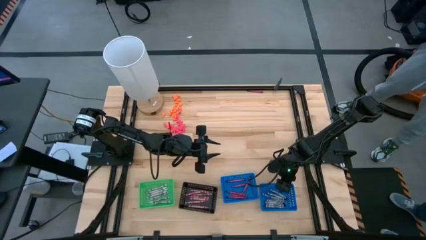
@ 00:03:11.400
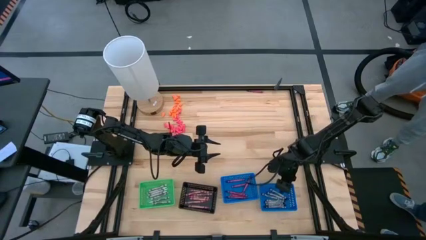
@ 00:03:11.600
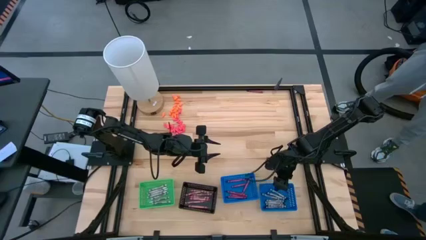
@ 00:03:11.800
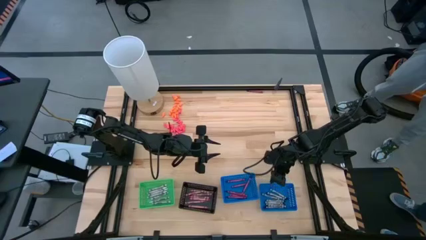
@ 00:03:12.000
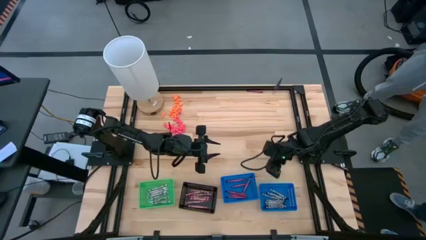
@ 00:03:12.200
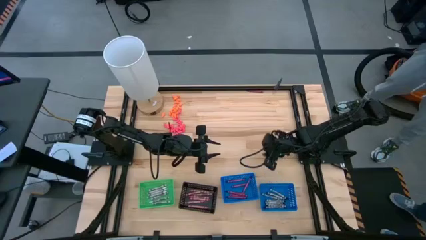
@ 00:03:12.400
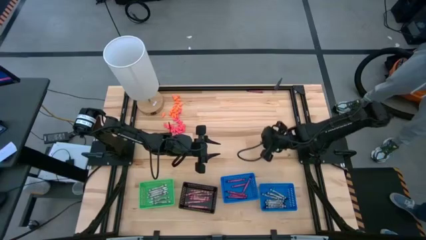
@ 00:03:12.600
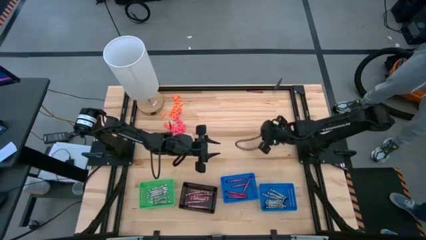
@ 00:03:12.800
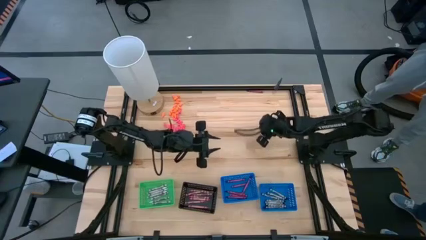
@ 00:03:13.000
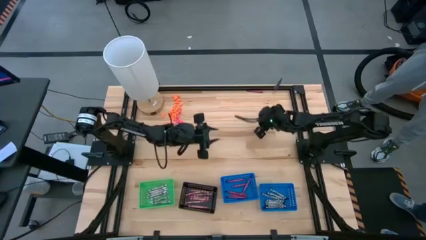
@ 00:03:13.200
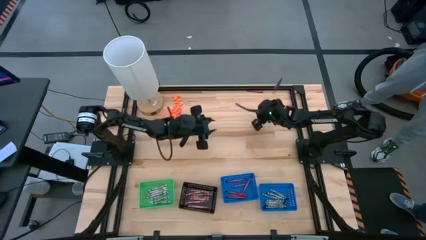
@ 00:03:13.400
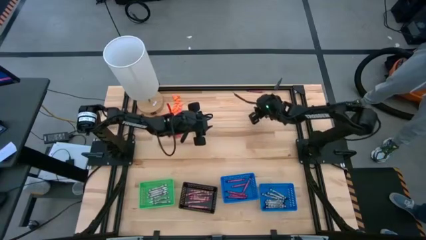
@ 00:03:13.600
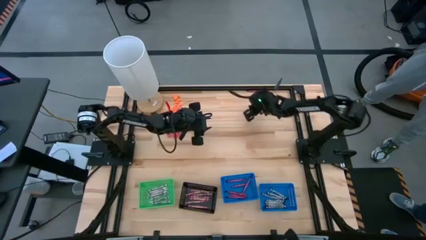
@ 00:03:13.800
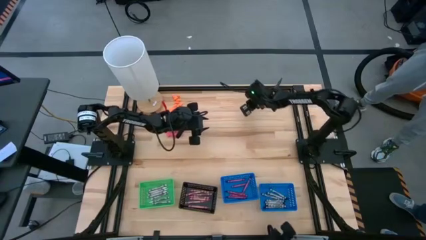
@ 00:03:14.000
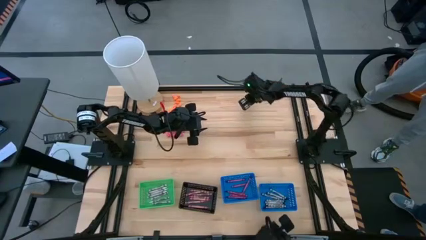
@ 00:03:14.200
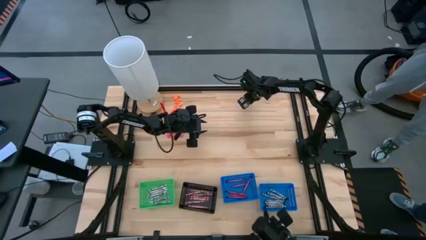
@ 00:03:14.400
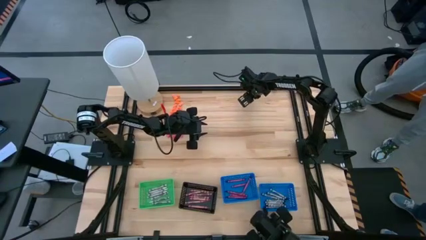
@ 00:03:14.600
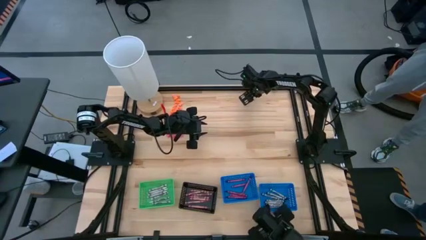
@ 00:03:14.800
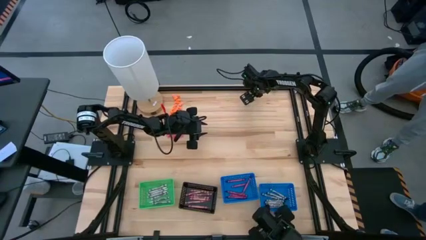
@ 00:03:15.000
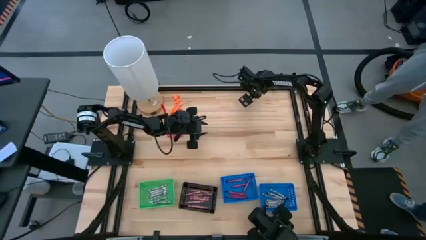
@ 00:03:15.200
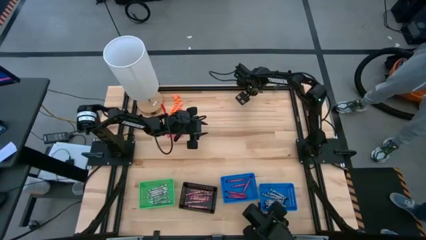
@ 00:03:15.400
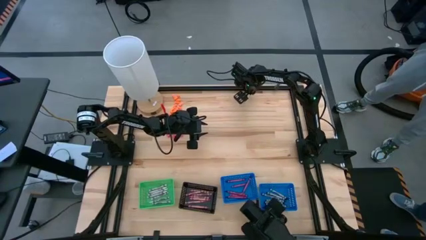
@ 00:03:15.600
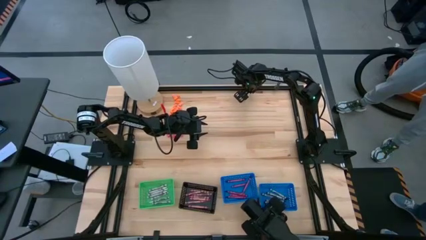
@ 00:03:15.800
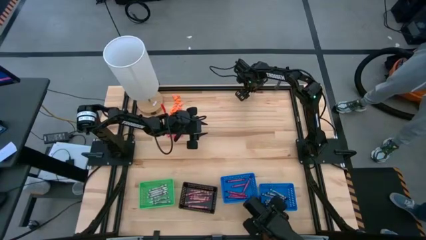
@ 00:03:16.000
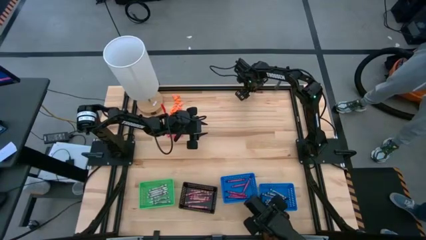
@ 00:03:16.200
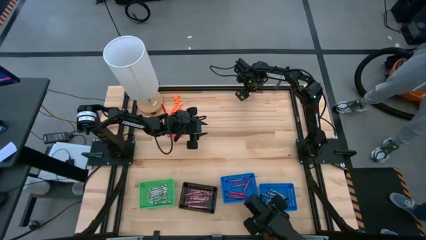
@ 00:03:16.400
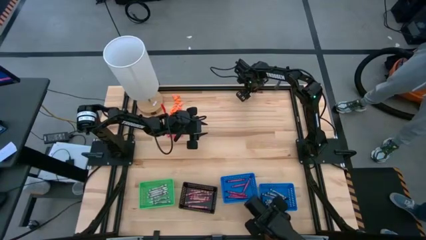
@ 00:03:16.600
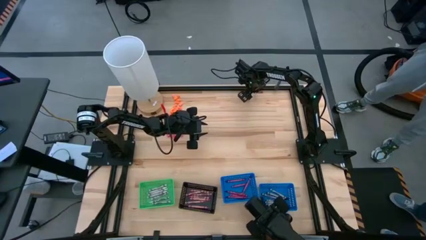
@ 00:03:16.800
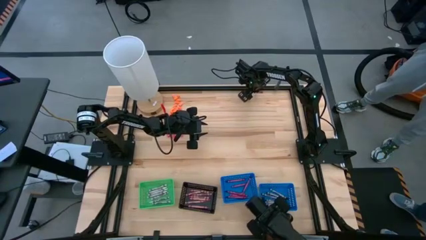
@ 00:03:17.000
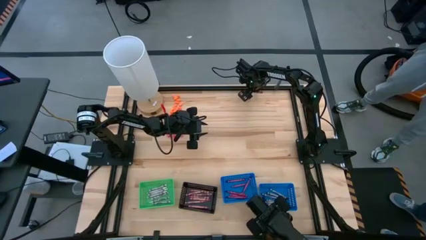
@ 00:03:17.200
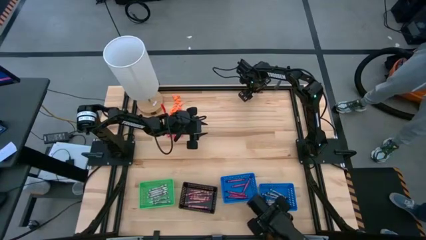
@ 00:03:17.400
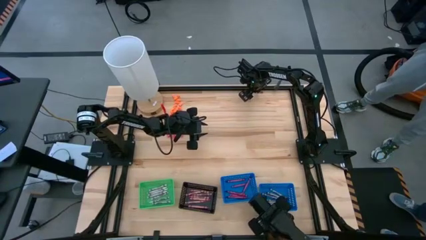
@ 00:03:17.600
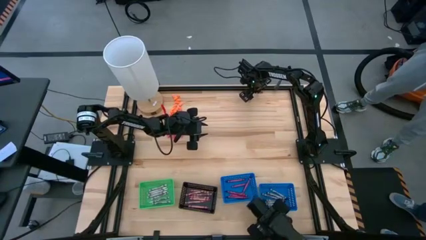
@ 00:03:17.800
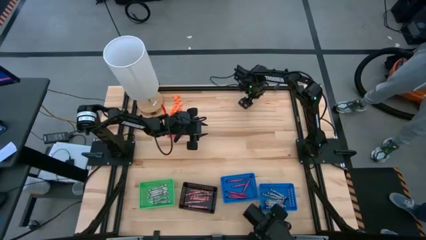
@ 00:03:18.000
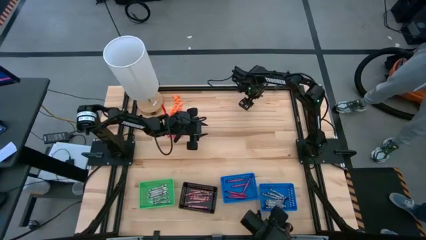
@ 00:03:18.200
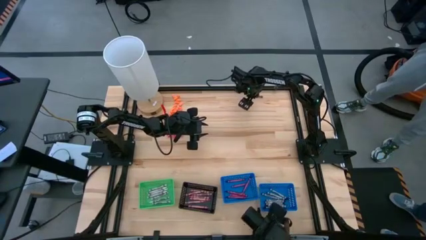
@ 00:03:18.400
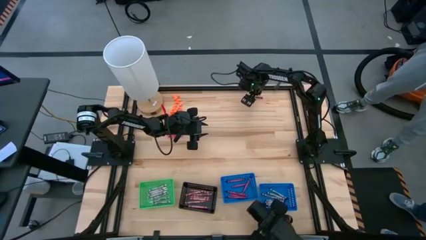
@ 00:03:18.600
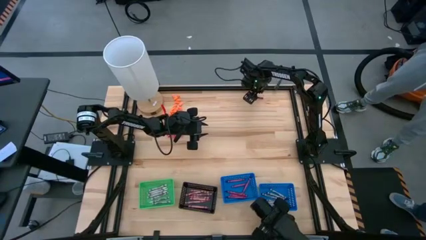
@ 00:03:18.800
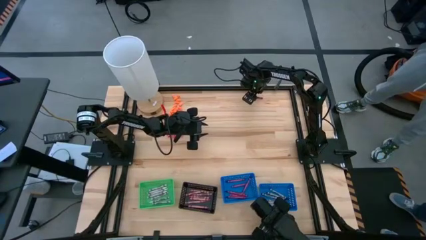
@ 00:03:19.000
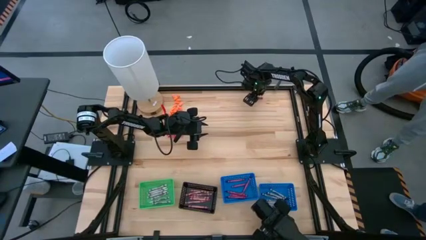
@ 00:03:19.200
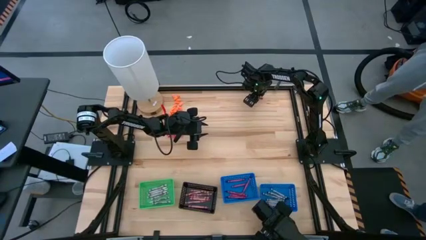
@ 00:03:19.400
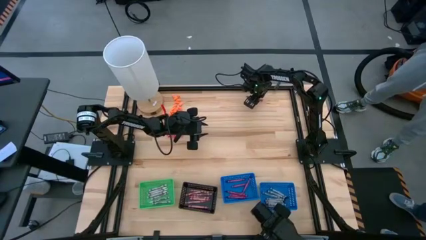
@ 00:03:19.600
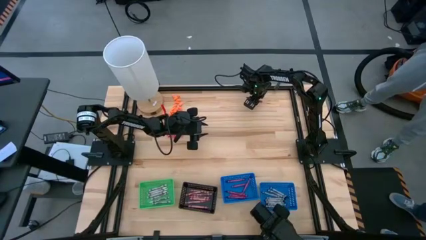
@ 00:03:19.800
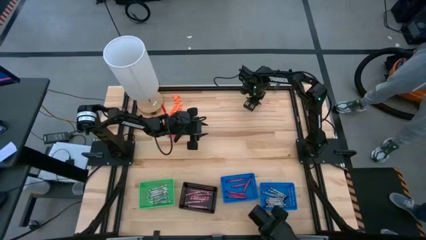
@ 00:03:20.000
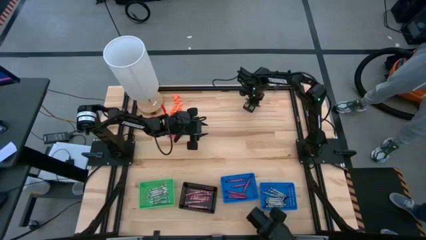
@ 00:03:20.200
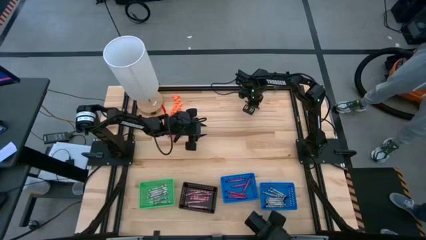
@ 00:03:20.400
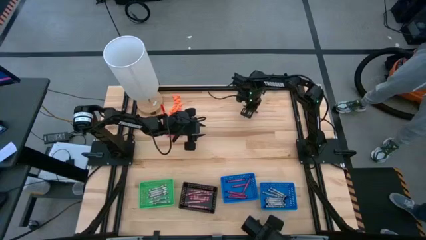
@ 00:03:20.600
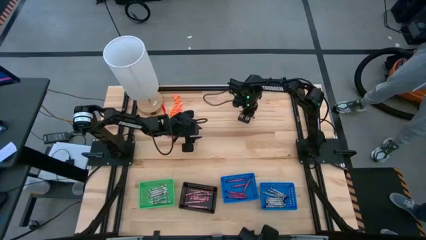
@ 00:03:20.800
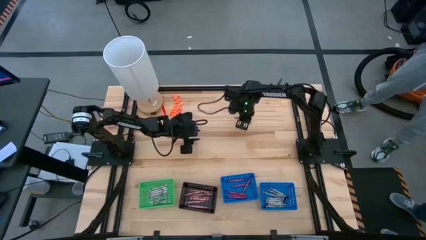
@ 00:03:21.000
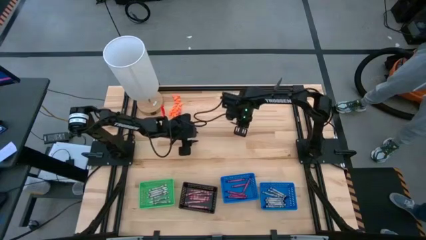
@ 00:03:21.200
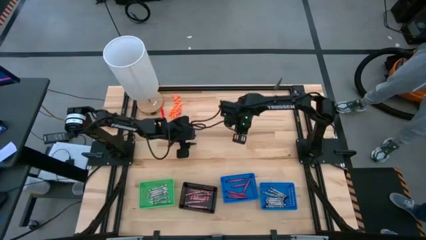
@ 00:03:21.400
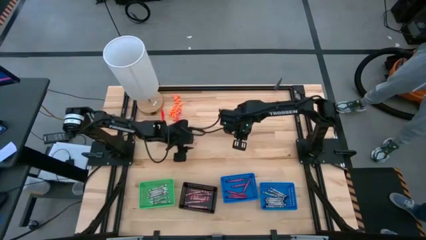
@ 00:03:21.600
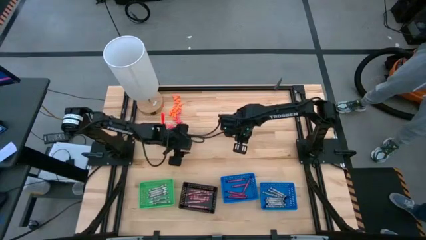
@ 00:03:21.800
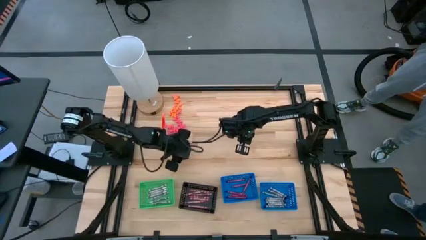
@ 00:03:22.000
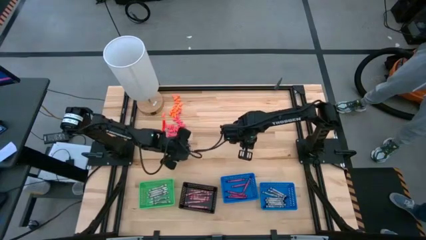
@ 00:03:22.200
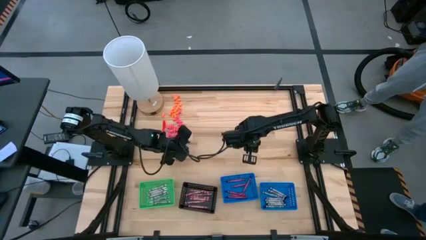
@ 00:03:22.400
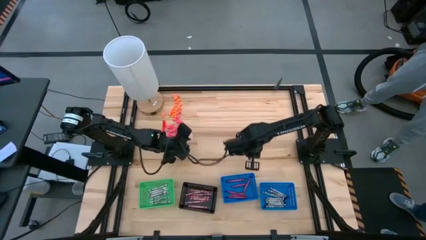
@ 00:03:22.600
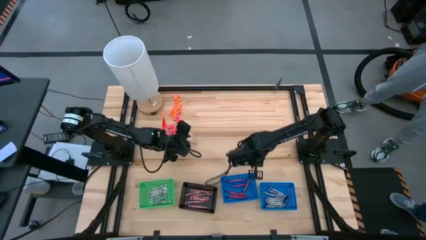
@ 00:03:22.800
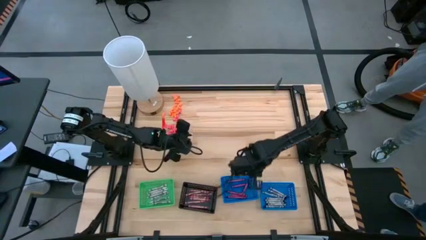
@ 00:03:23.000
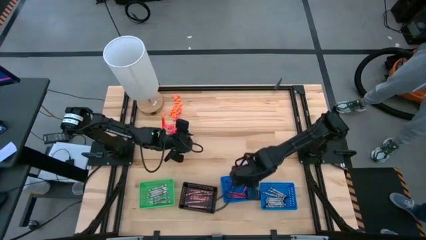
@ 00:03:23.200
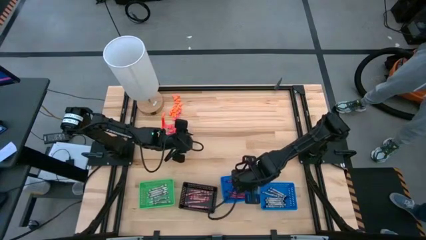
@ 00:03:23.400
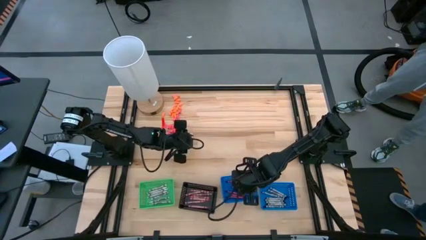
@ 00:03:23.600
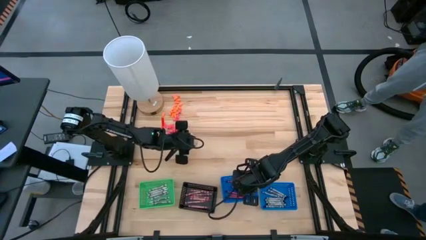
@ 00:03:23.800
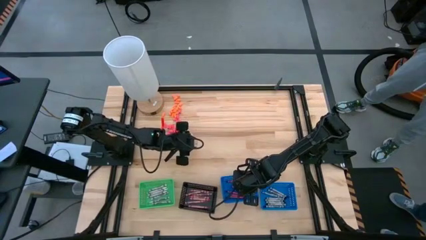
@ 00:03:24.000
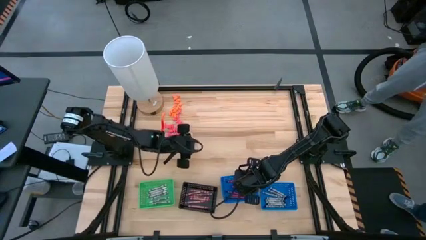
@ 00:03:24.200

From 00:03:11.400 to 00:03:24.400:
Task: Sort crayons
Put the red crayon into the left blue bin

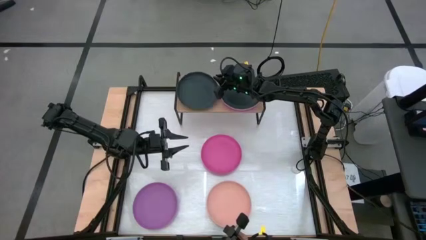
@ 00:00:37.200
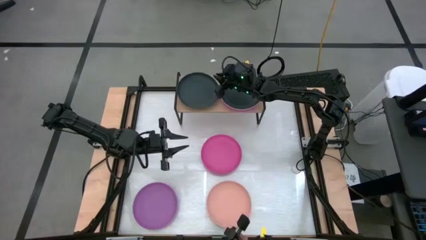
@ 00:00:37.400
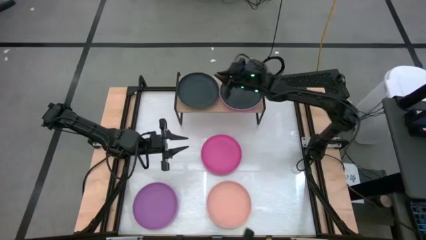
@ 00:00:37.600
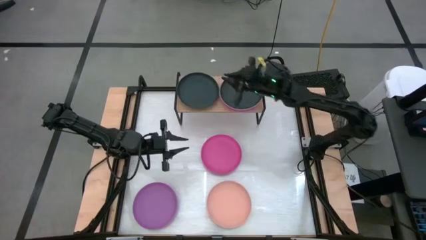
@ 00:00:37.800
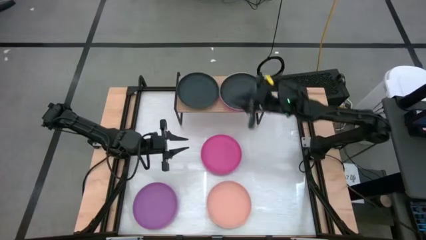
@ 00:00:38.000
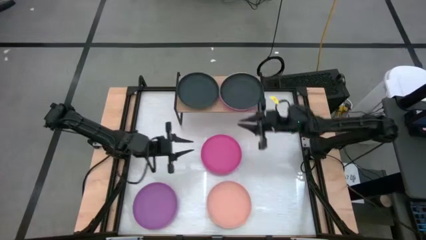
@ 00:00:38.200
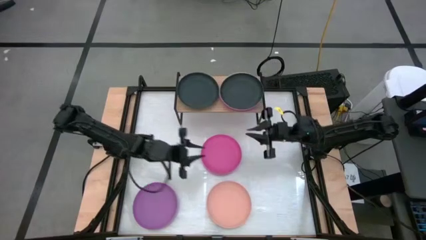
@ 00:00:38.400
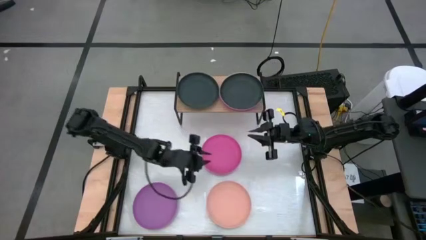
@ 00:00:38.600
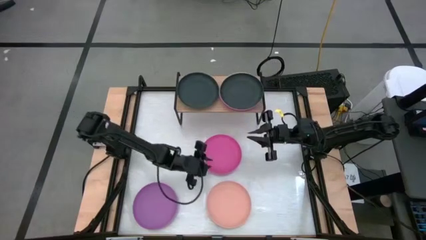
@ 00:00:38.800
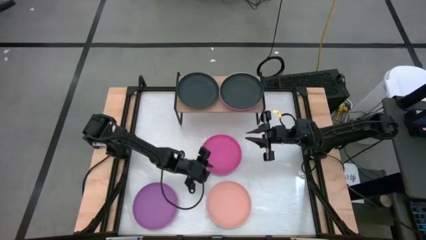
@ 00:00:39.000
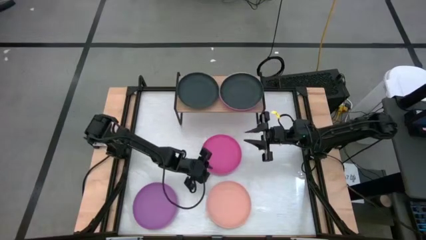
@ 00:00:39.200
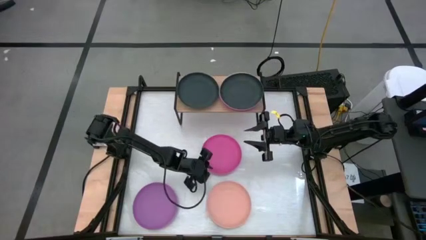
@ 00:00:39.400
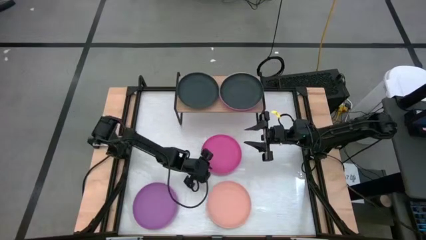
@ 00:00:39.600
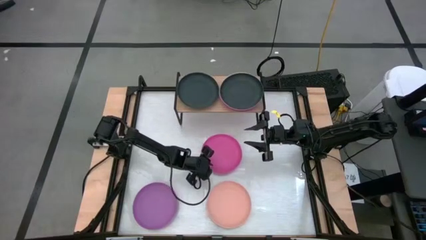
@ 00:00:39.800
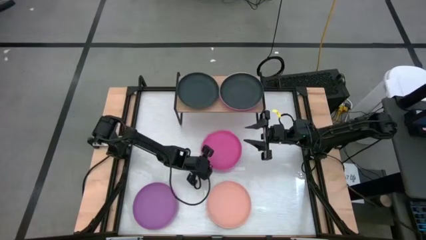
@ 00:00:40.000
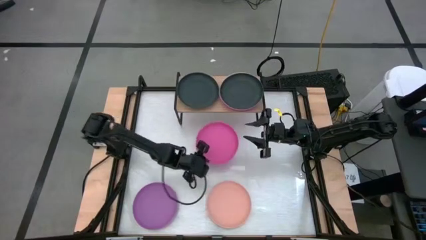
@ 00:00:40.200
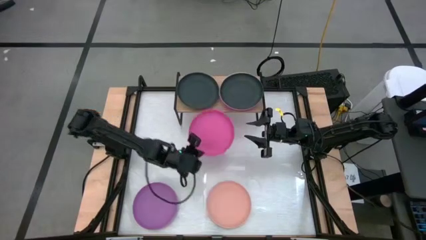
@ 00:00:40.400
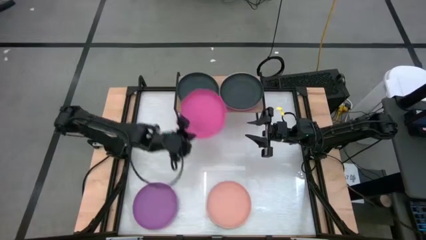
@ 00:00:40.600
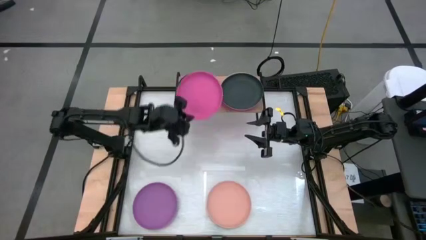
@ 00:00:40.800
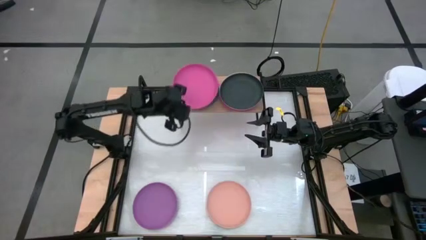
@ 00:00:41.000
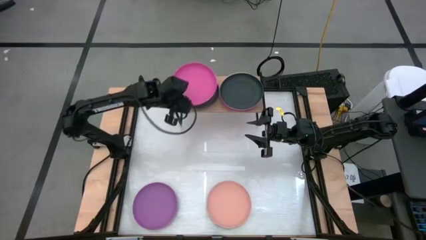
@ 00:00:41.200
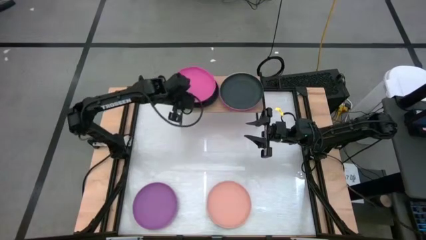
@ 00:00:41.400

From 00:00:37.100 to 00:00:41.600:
Task: Place and stack plates onto a shelf
Stack the pink plate on top of the black plate on the shelf
